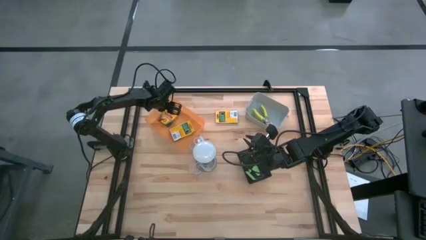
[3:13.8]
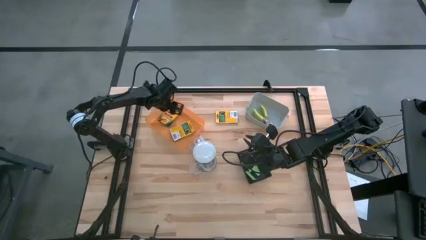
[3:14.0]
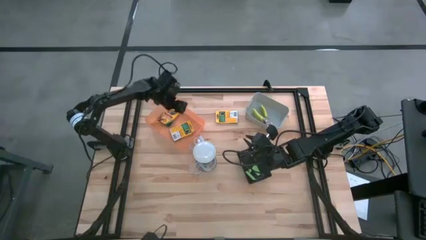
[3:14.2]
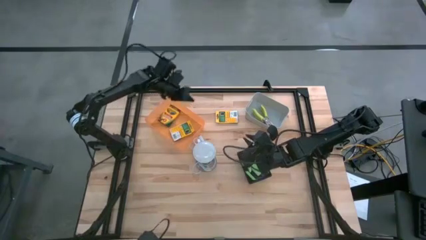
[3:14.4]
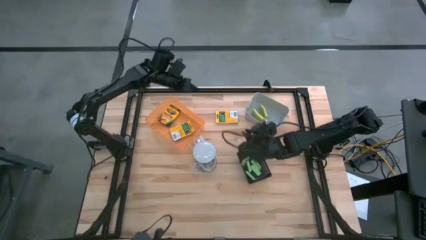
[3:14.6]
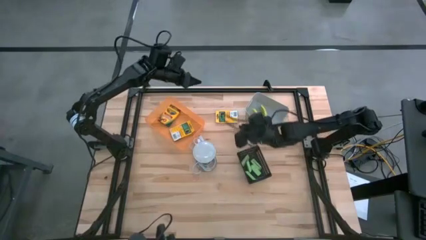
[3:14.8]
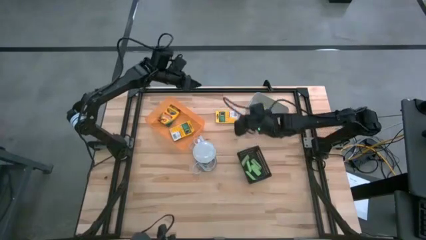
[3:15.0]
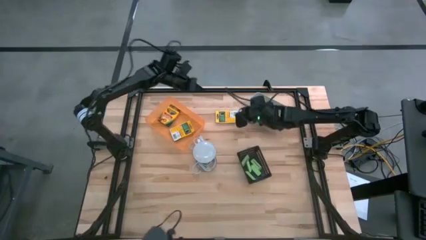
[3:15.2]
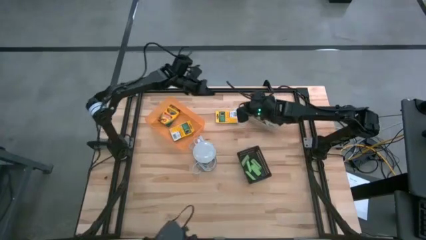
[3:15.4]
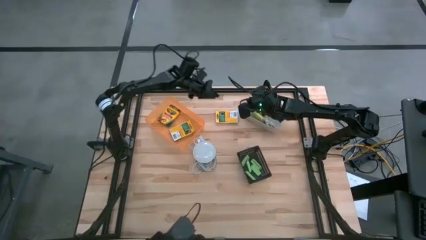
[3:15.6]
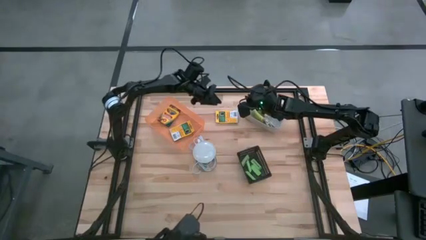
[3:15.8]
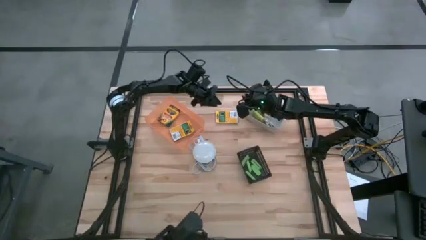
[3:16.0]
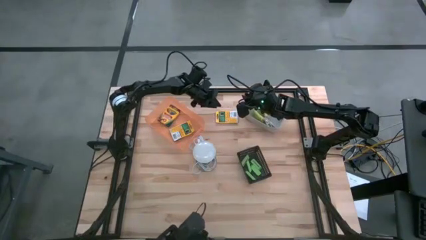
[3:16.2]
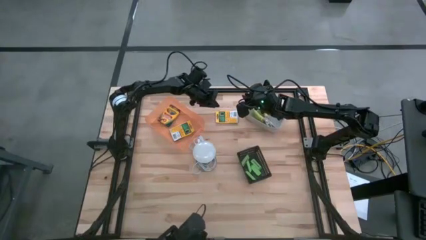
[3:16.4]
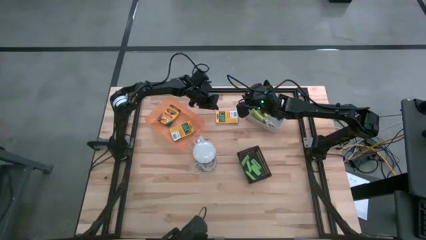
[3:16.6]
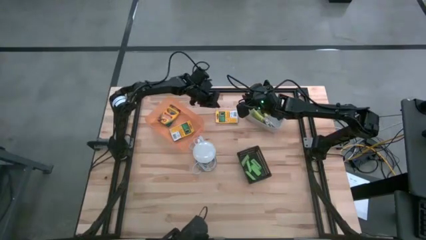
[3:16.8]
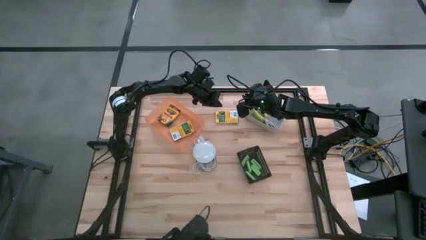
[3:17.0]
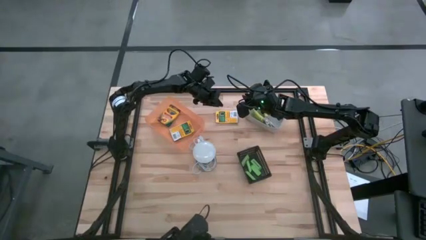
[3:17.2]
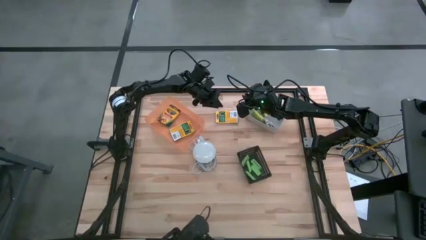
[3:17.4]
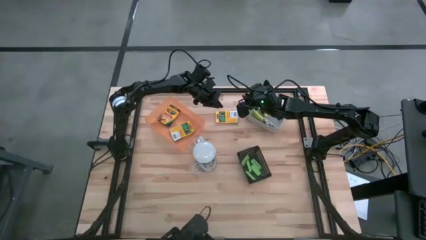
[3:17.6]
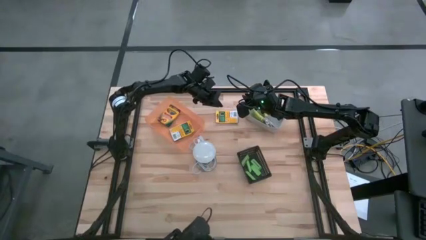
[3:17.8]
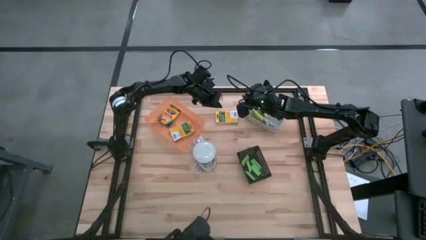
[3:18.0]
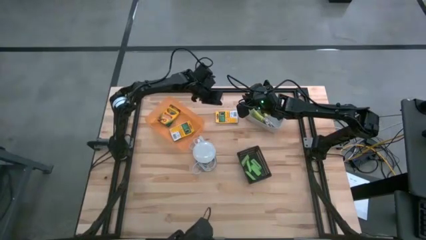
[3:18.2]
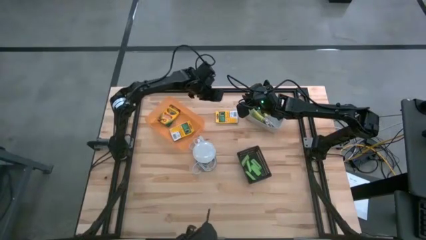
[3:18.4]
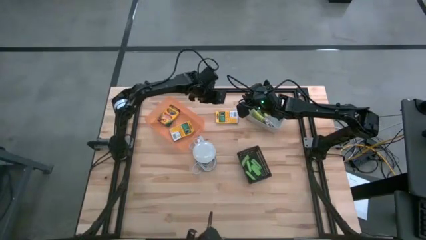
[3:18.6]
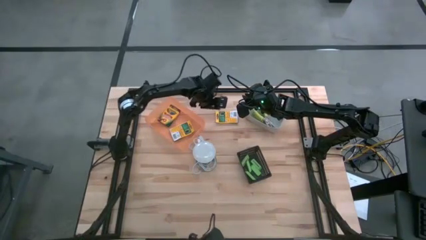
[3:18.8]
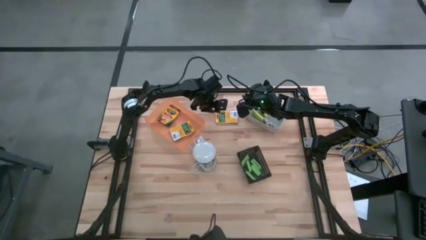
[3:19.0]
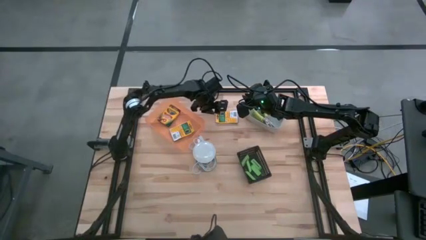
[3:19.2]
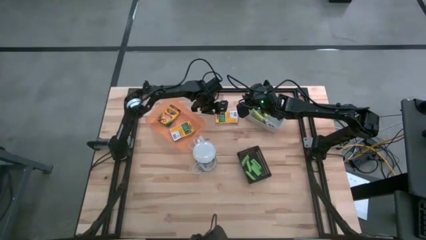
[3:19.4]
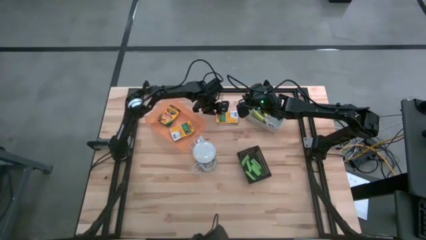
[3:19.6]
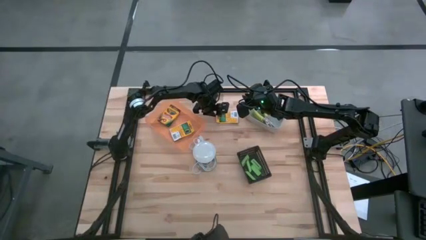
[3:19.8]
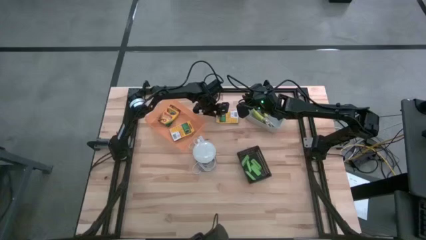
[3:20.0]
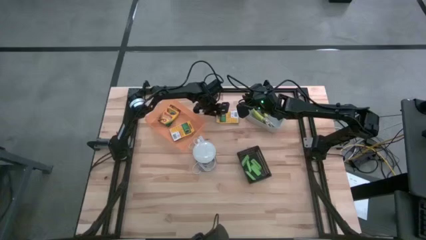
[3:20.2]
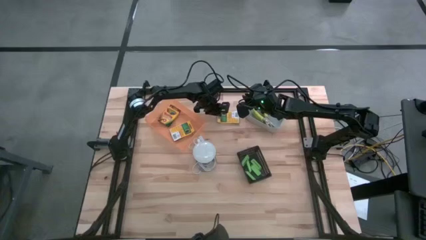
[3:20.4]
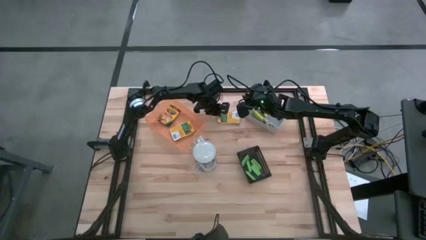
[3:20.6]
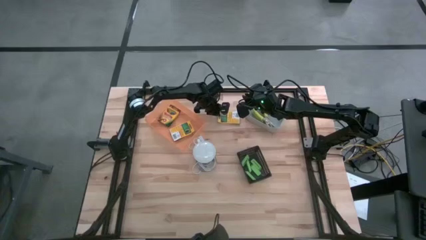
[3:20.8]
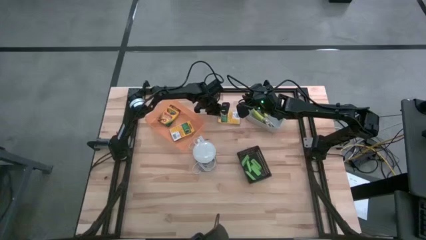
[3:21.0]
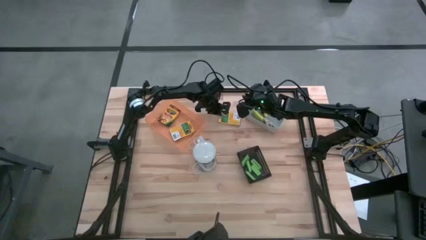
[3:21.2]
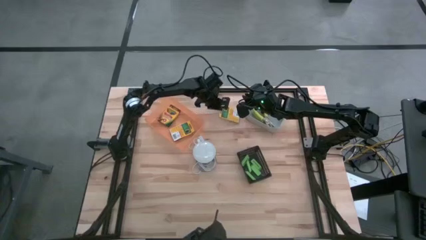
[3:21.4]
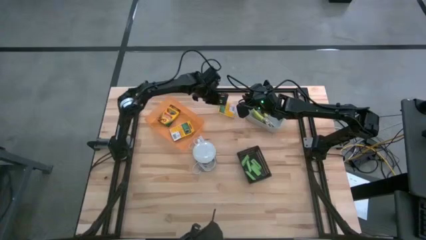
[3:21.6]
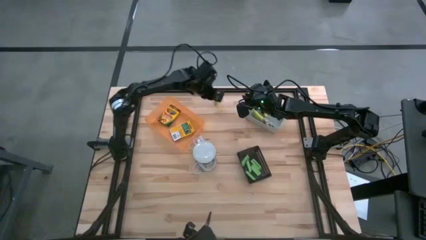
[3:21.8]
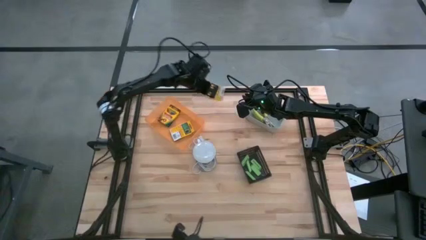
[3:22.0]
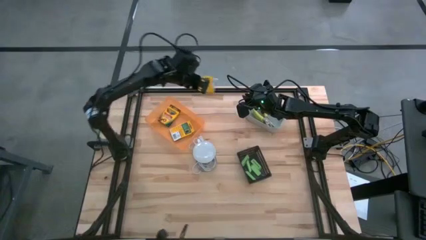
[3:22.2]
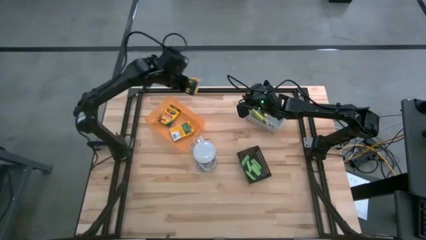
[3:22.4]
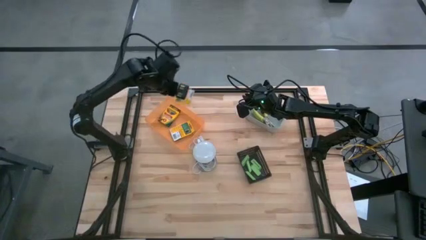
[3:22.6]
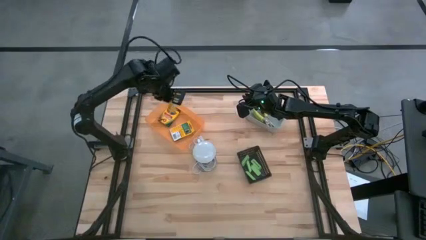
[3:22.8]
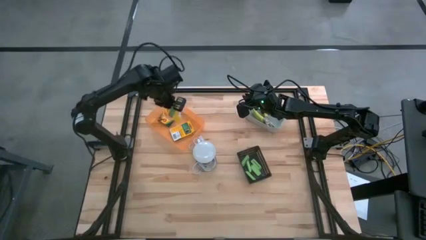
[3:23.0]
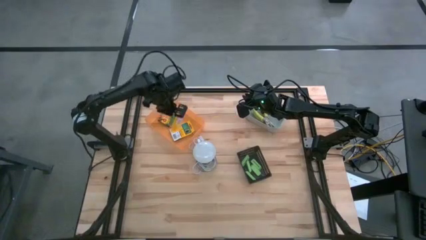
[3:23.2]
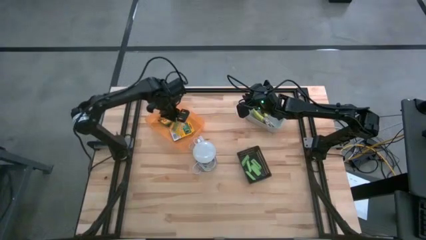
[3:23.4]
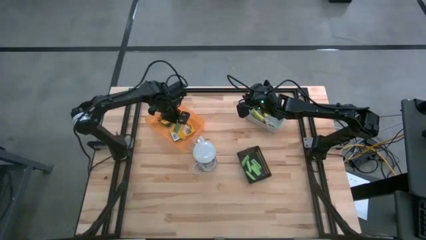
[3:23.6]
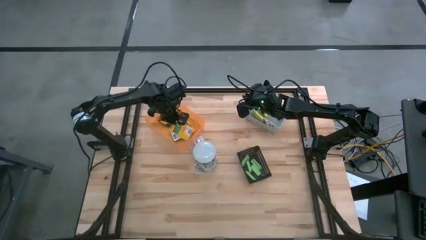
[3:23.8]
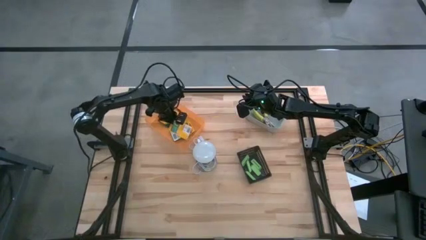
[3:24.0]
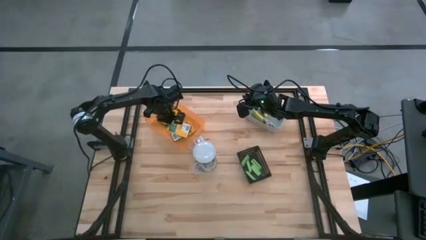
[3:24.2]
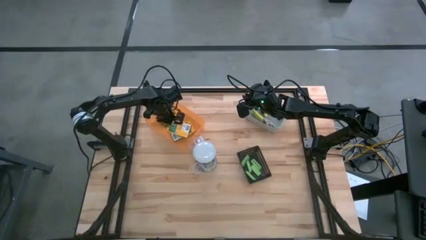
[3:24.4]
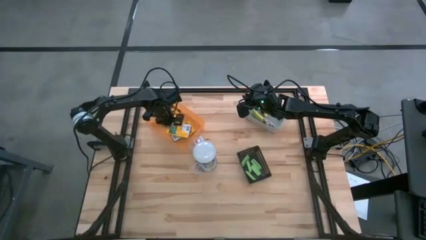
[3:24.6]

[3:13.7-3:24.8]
Task: Pick & Place School Supplies
Put the box of crayon into the orange bin

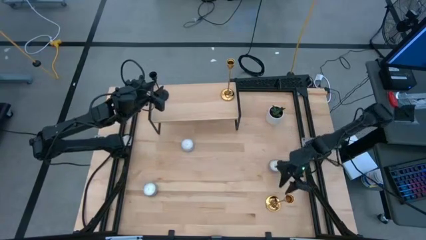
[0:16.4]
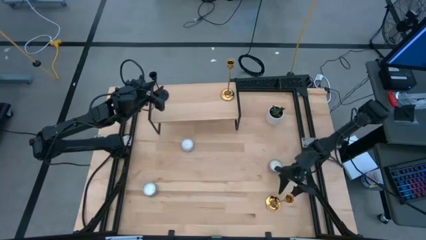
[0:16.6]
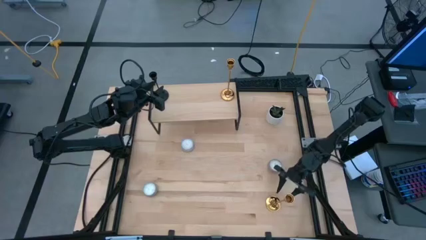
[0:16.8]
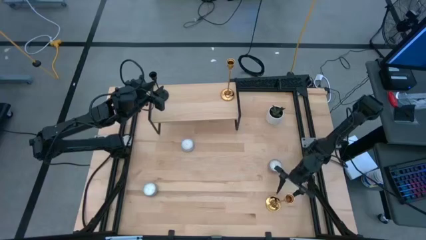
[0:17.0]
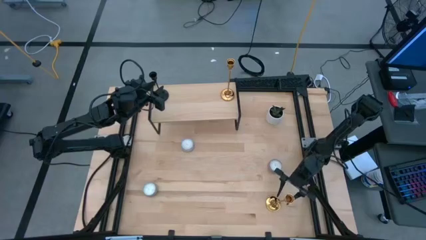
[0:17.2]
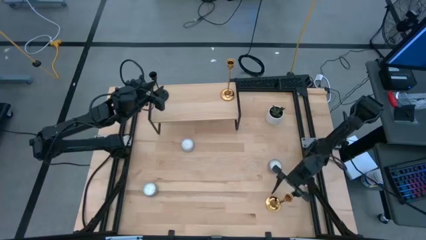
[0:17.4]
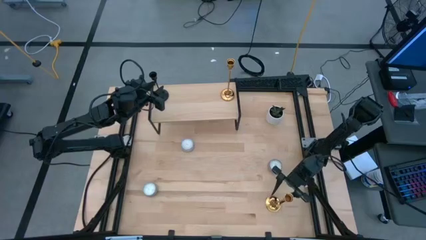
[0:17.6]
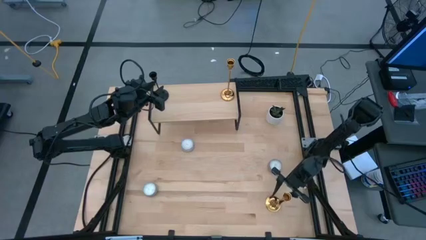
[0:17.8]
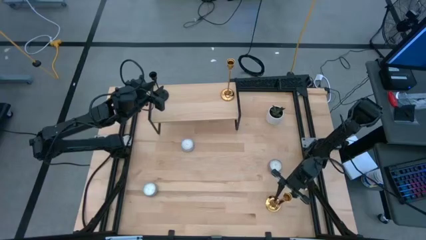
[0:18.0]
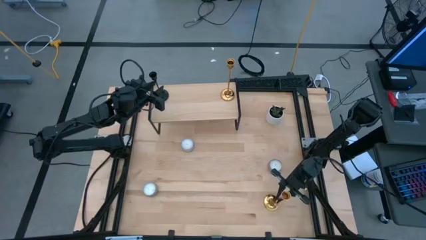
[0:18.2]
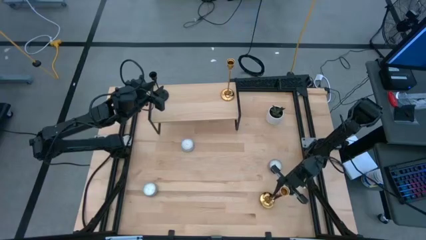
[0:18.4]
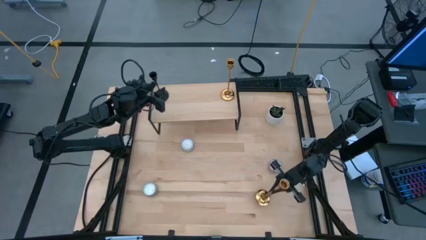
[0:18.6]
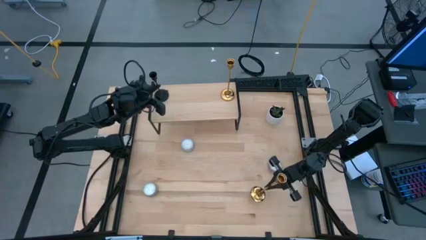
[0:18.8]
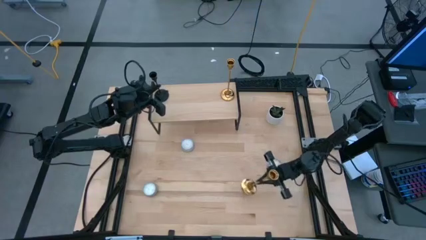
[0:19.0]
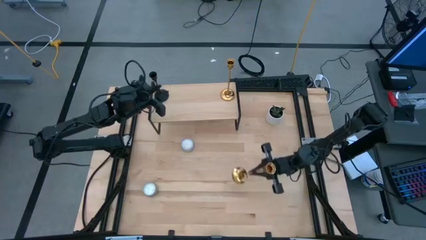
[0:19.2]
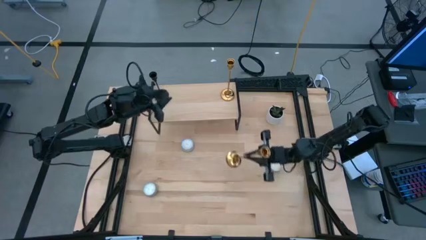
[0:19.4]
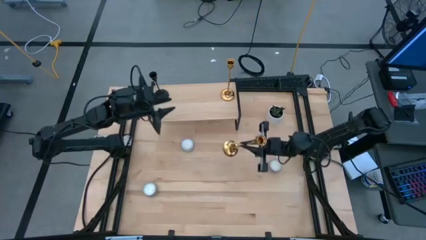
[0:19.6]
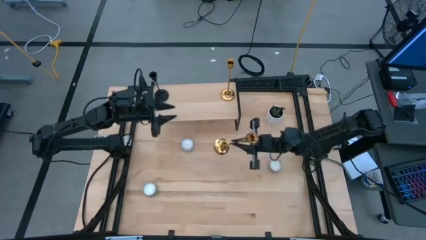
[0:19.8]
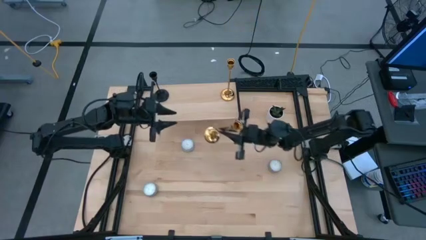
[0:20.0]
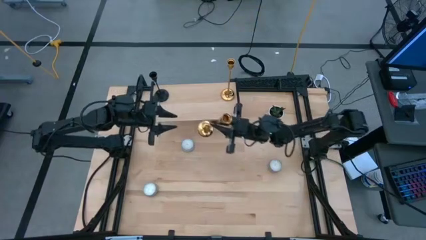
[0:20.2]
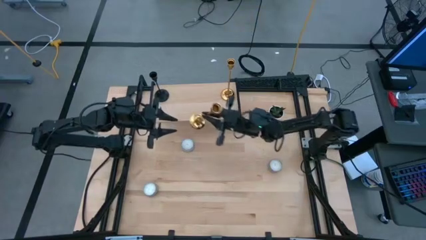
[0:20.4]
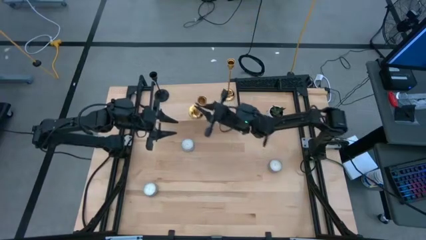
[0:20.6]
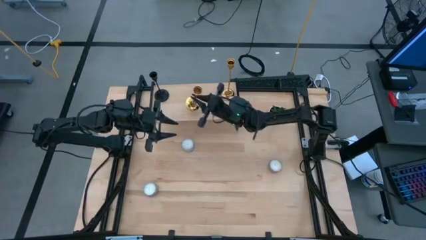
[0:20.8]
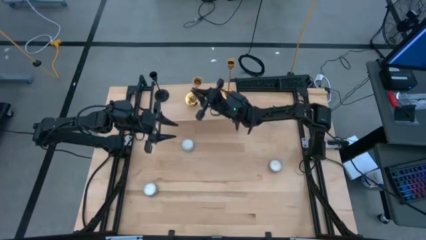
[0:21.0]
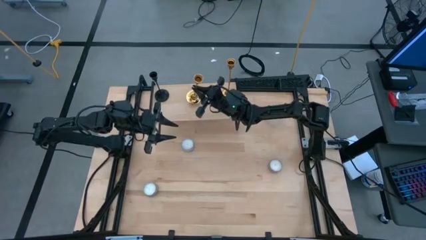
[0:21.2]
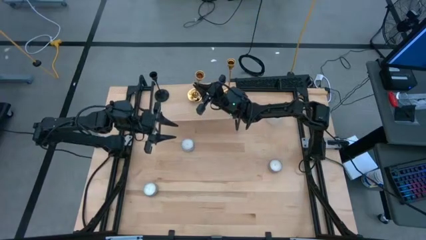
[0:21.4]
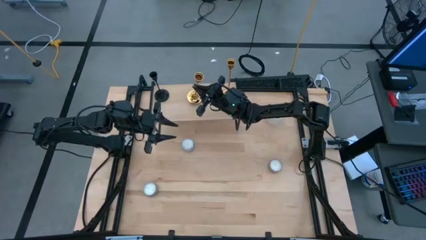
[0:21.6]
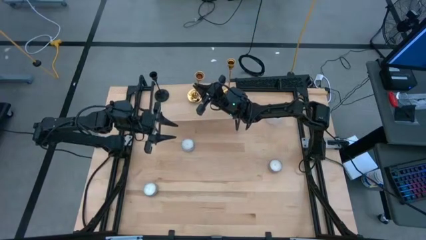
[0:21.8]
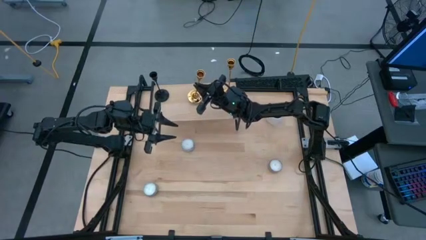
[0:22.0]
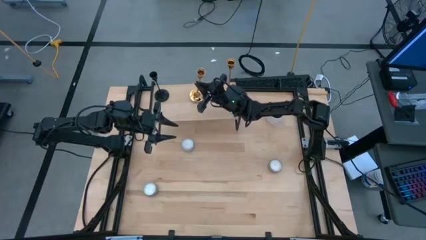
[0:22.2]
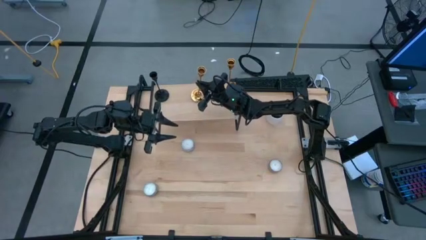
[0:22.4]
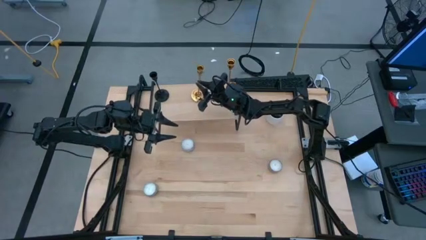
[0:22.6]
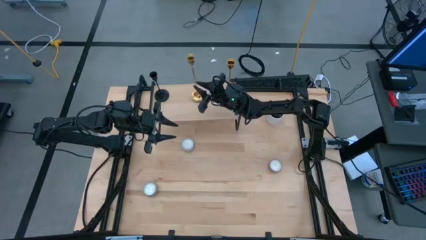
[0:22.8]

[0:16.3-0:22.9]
Task: Pick & Place candle stick holders
Put the gold candle holder on the shelf
